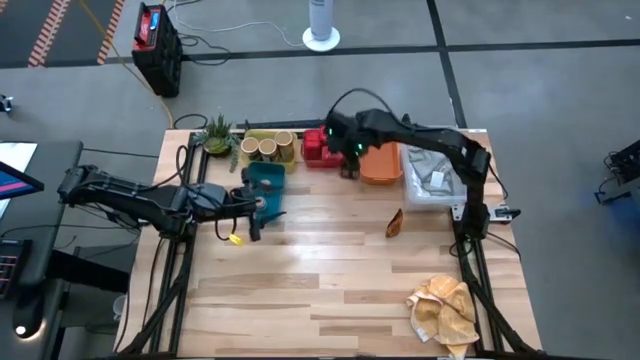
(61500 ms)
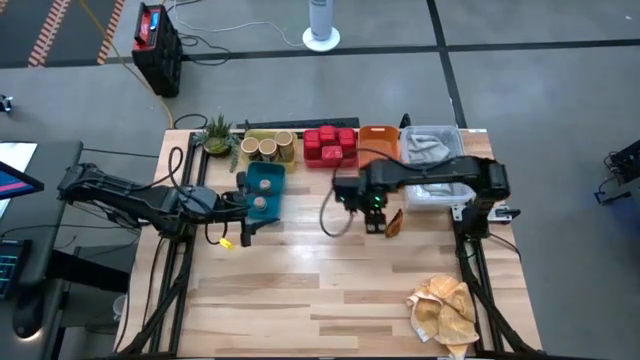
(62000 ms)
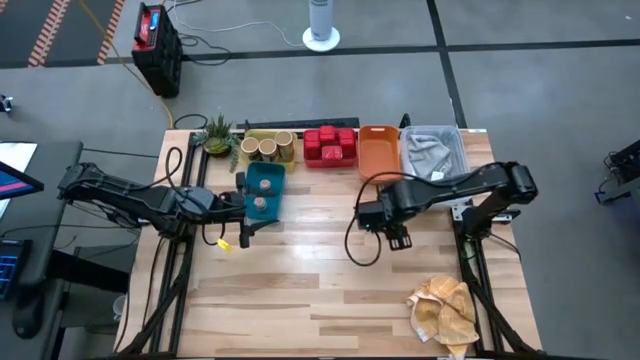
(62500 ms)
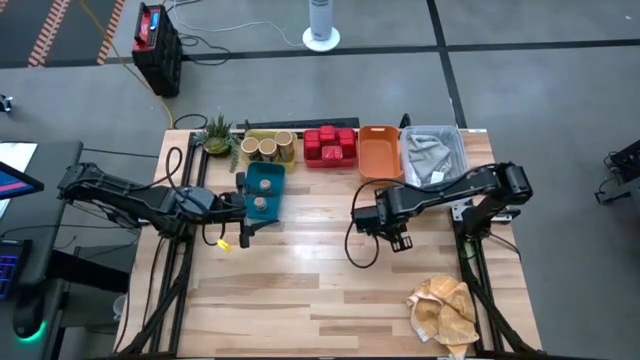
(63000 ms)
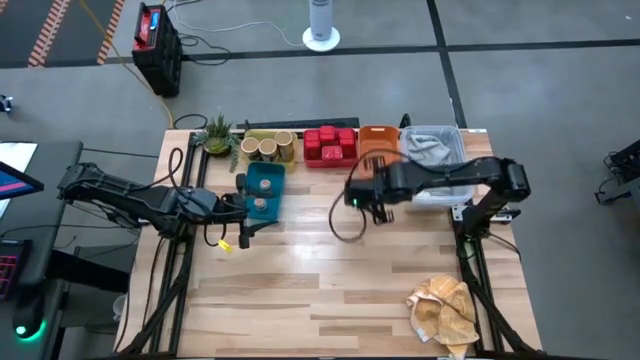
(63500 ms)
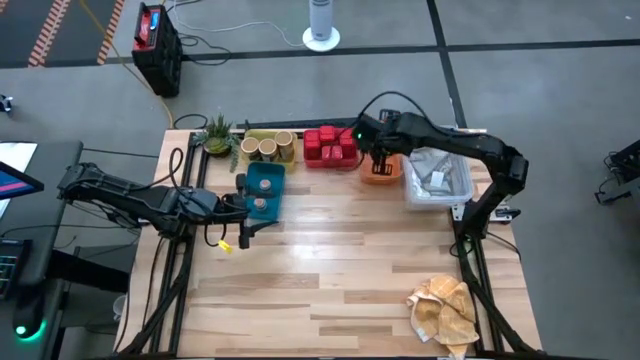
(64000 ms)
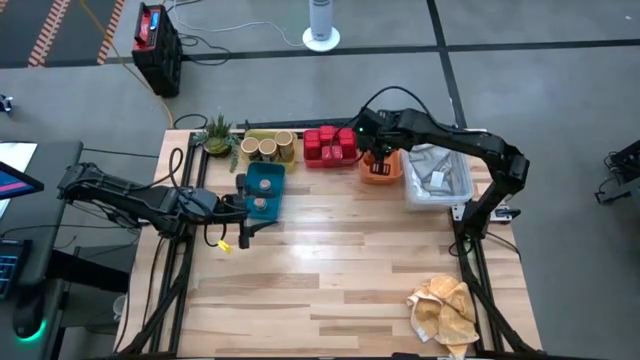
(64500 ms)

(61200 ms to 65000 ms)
Task: Sort spices by type
Put the orange seasoning bag into the orange bin

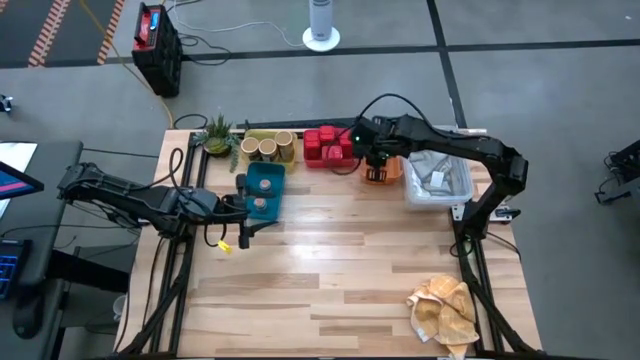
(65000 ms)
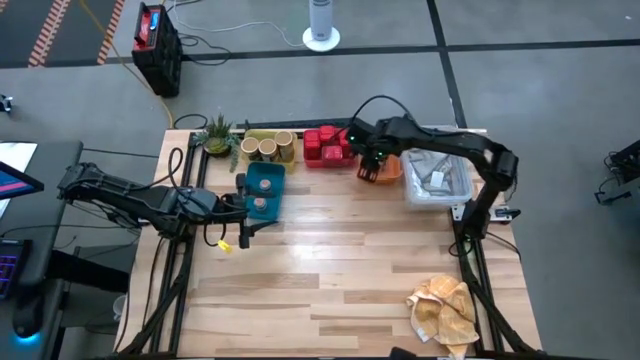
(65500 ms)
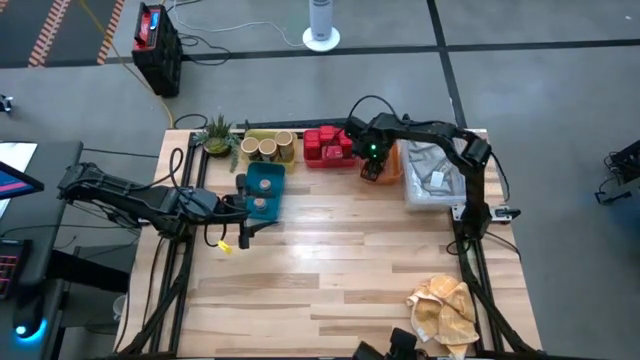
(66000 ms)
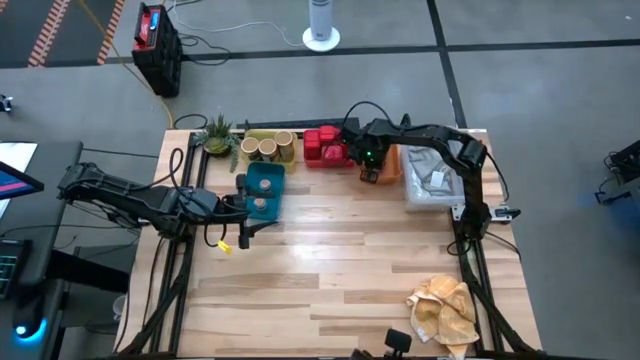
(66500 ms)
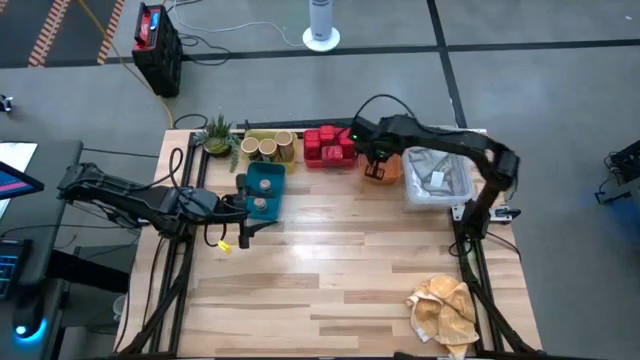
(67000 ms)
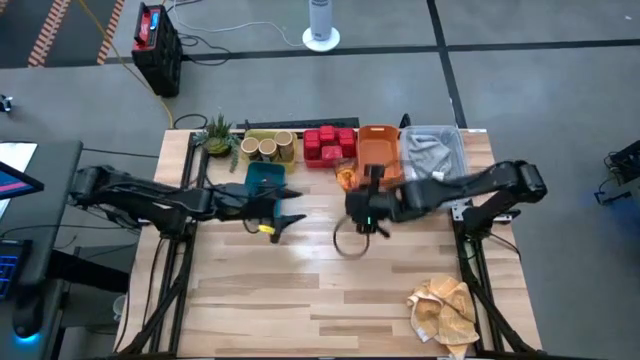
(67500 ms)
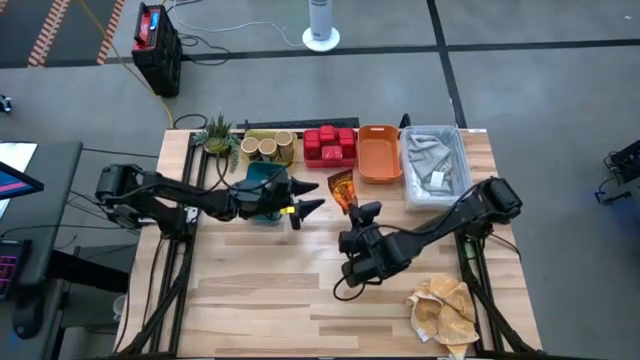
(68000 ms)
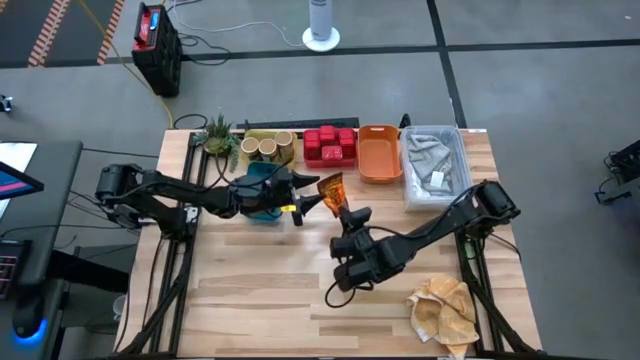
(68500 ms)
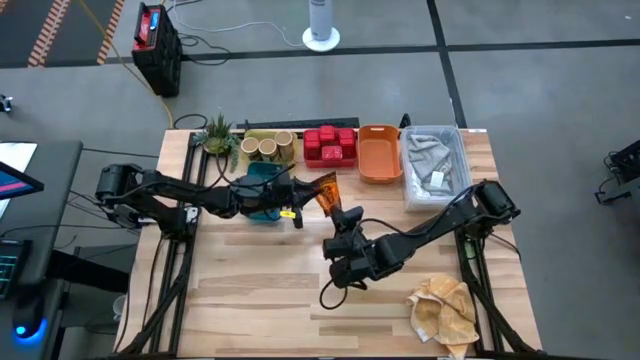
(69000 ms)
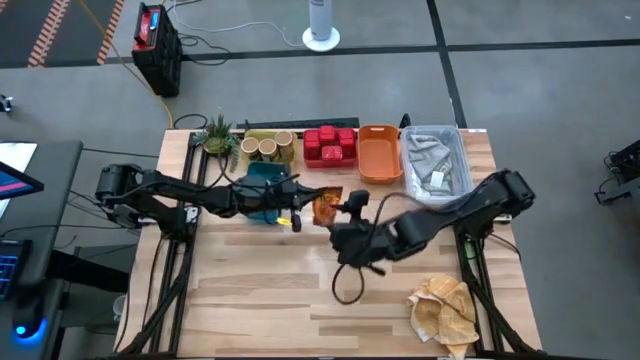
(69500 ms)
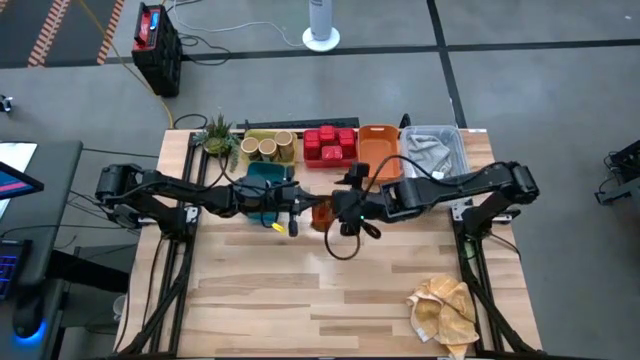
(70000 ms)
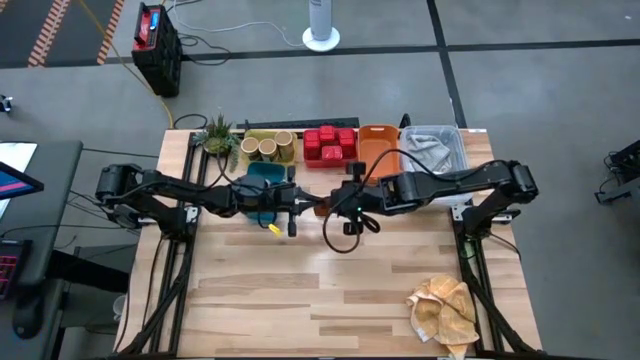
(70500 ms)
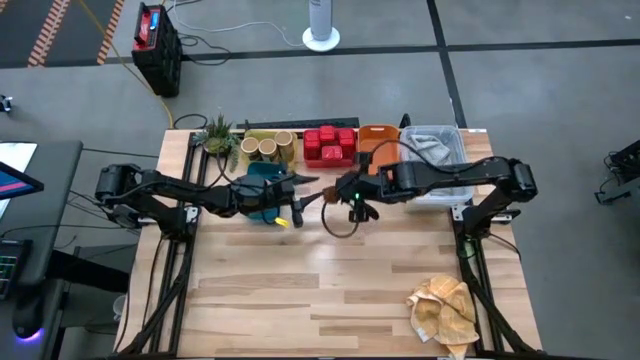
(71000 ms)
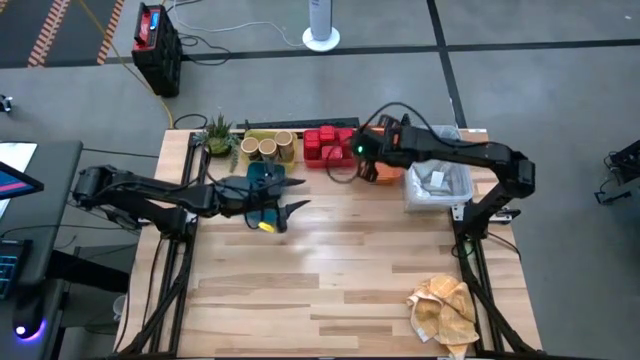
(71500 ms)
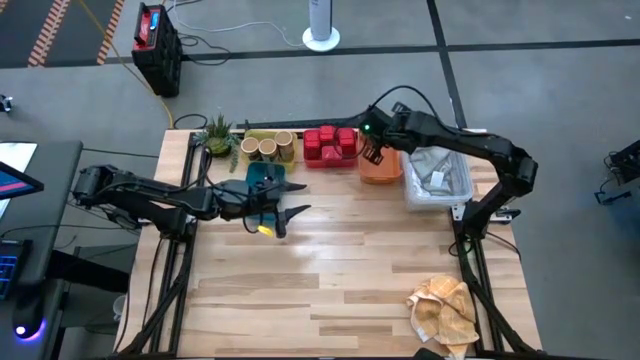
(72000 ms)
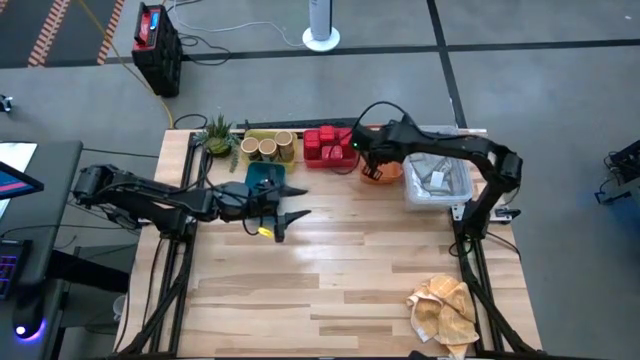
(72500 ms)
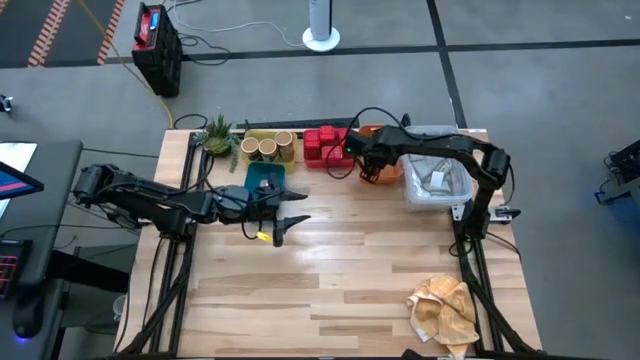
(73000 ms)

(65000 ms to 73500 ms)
Put the orange seasoning bag into the orange bin

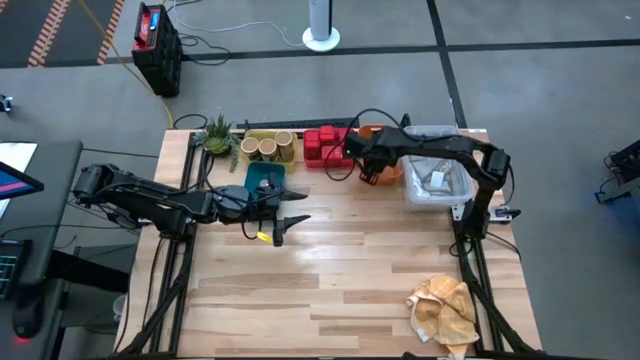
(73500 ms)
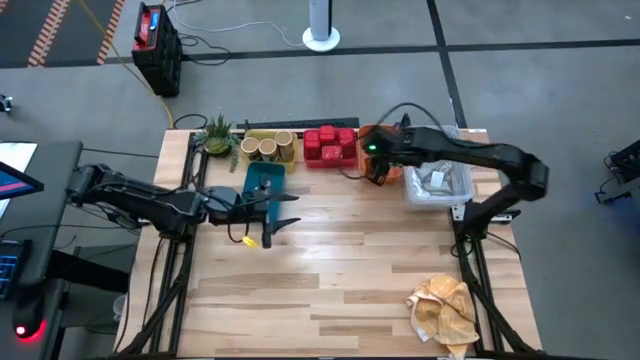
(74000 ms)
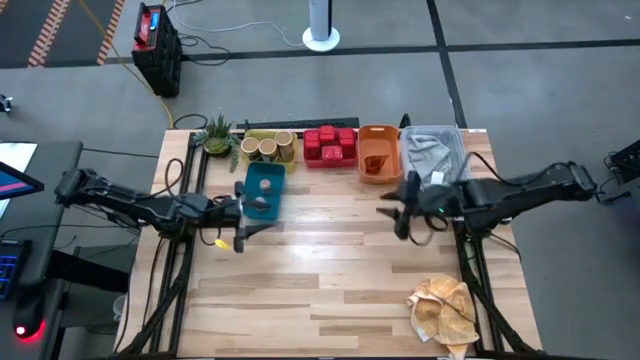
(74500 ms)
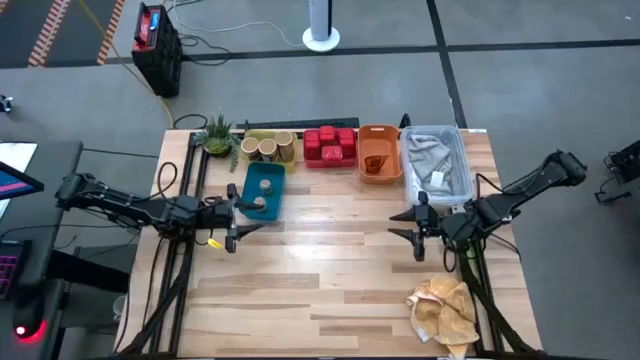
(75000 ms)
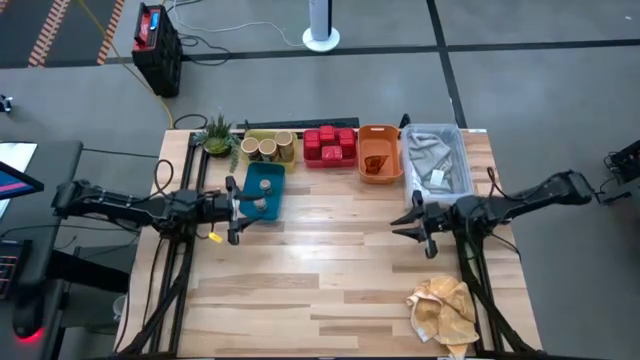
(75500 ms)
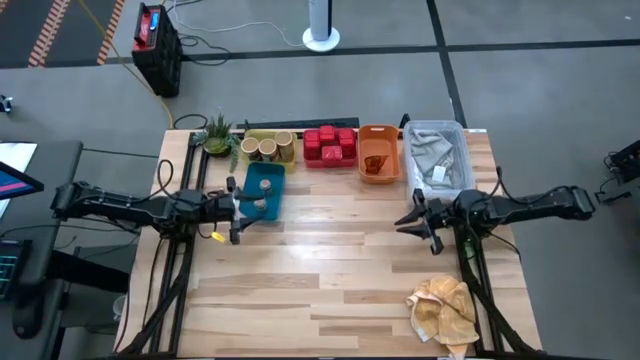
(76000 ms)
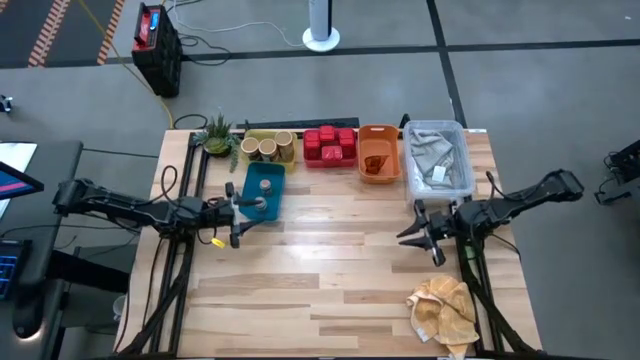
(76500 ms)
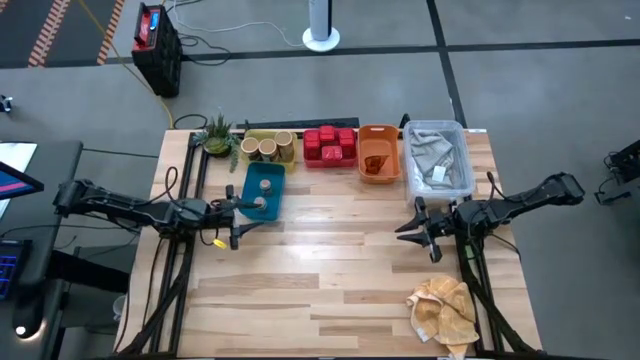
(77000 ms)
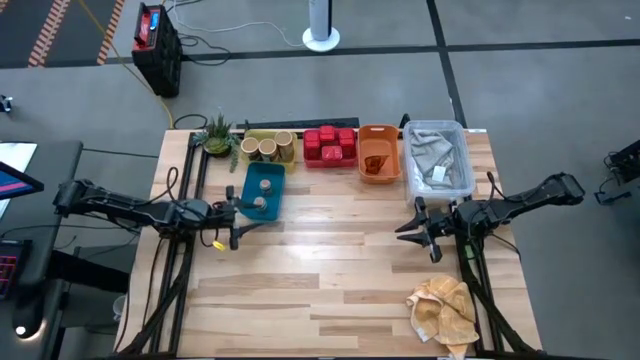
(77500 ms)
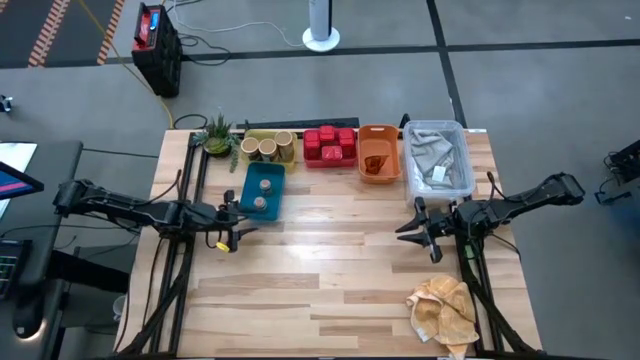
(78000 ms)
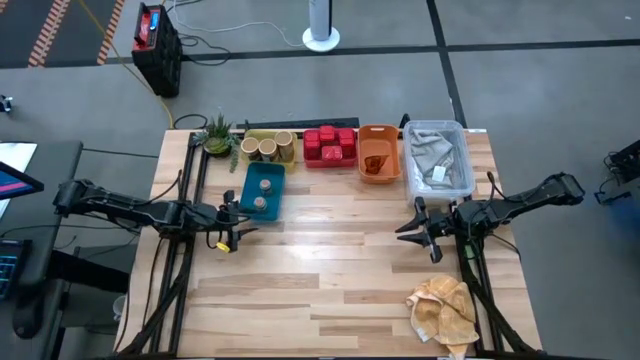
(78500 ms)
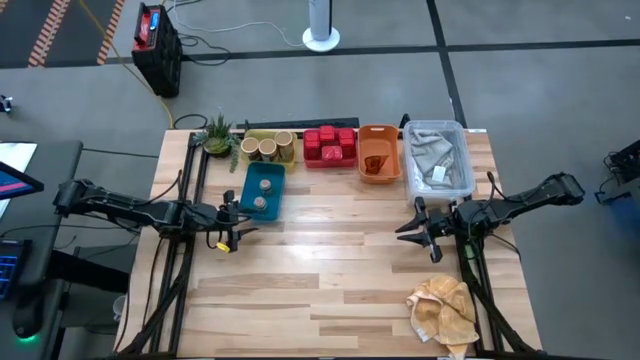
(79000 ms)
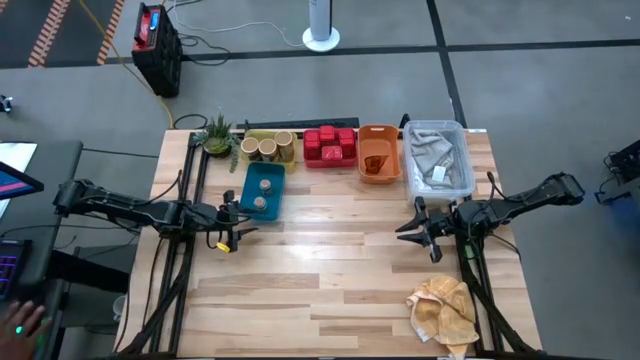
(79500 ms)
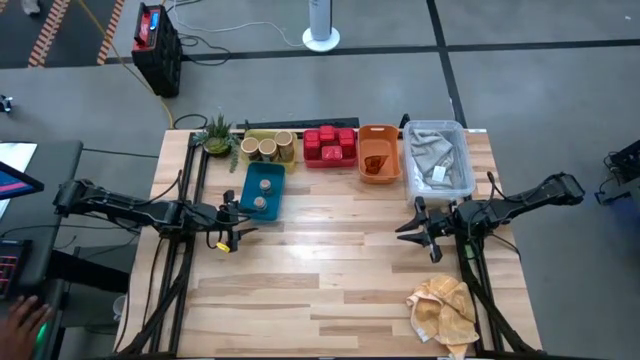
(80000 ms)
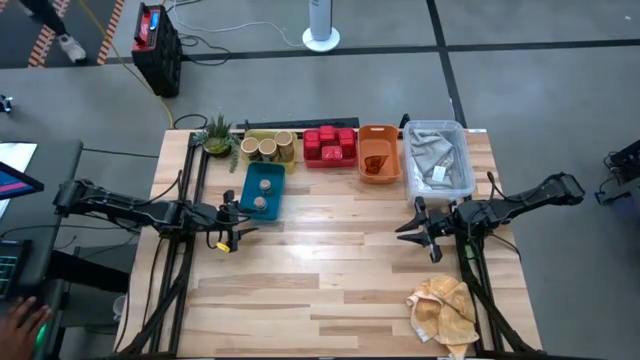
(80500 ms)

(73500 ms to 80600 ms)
Return to Home Position
